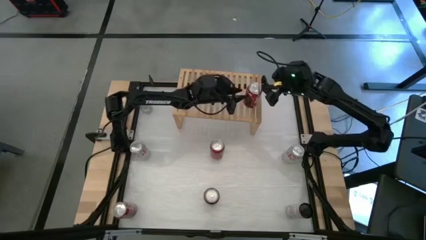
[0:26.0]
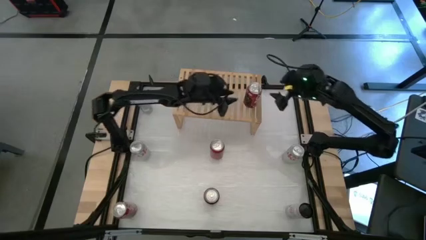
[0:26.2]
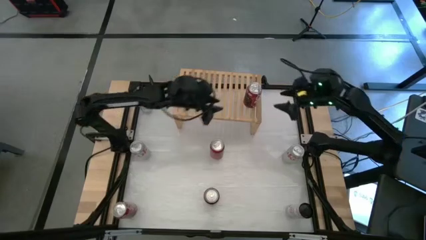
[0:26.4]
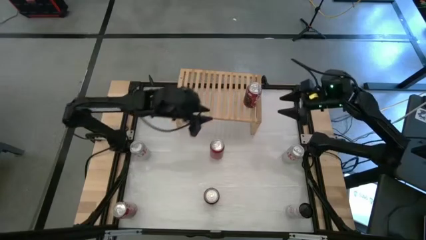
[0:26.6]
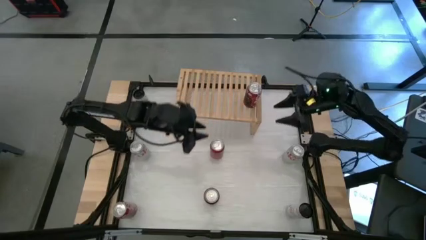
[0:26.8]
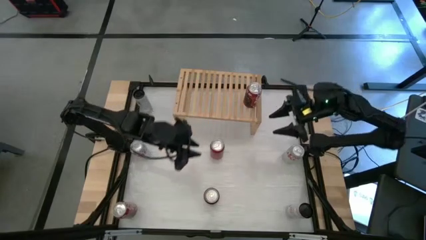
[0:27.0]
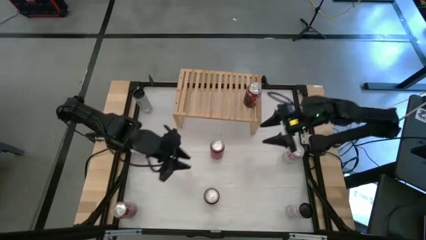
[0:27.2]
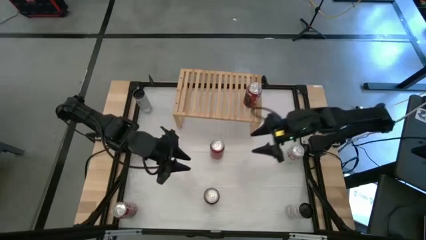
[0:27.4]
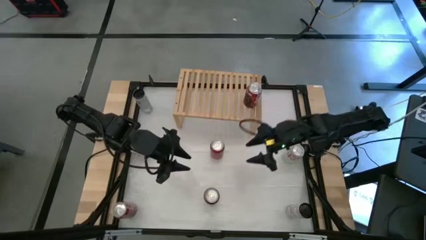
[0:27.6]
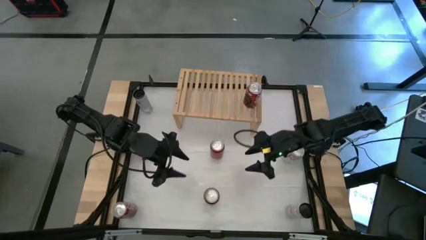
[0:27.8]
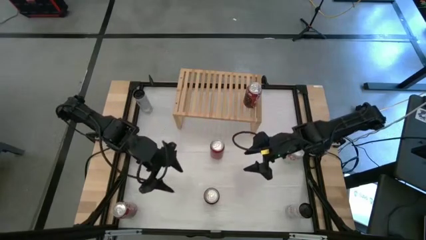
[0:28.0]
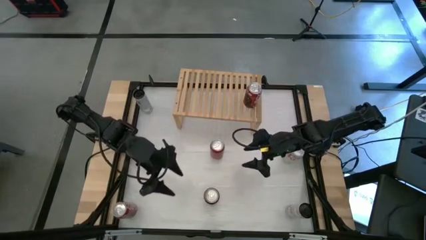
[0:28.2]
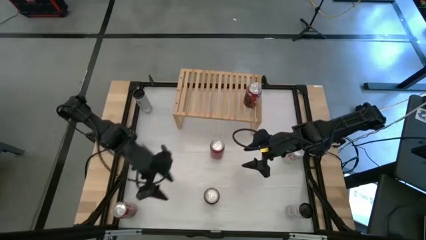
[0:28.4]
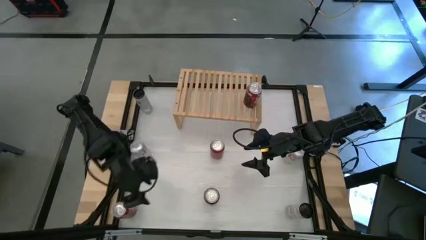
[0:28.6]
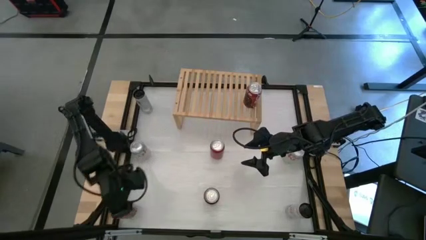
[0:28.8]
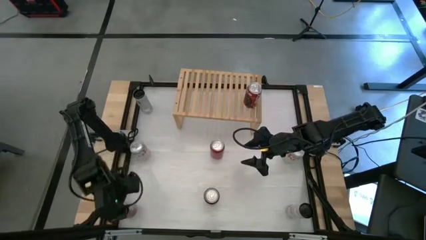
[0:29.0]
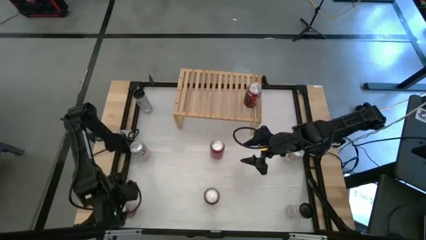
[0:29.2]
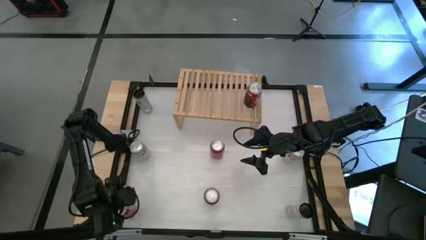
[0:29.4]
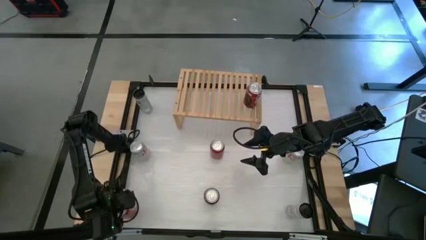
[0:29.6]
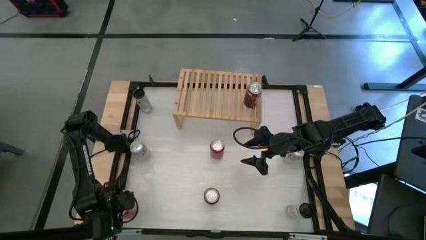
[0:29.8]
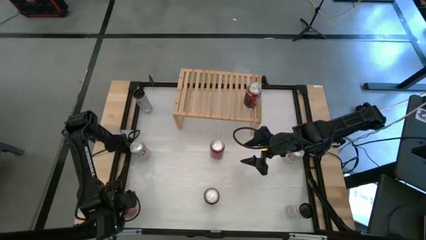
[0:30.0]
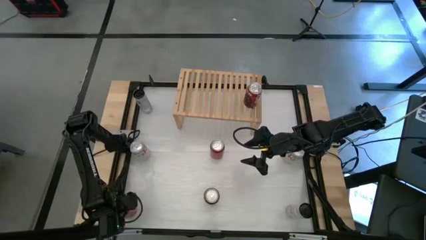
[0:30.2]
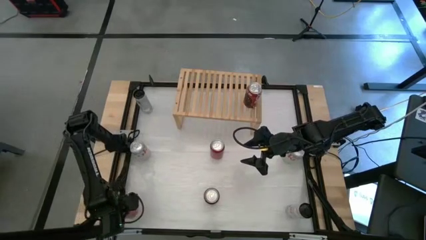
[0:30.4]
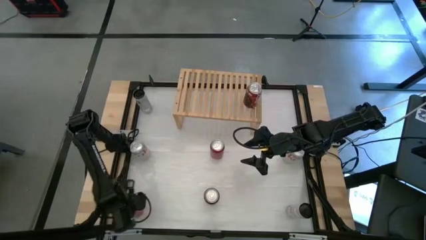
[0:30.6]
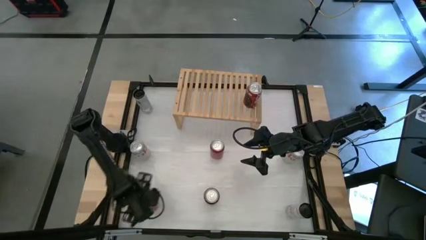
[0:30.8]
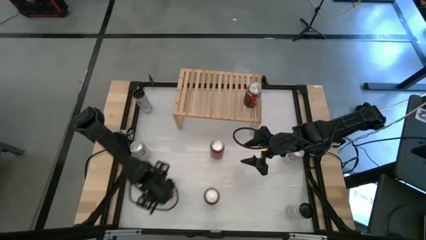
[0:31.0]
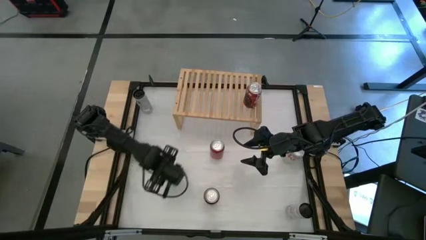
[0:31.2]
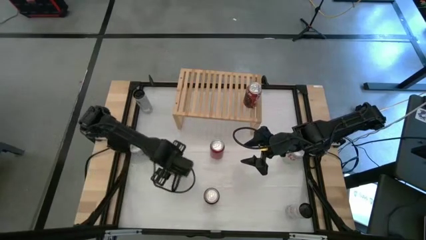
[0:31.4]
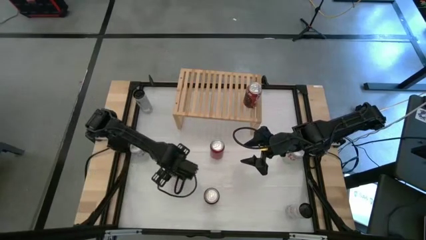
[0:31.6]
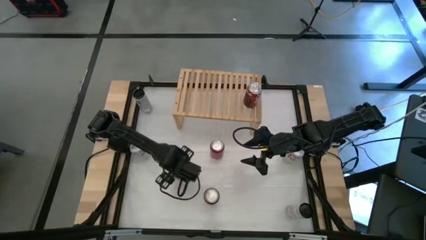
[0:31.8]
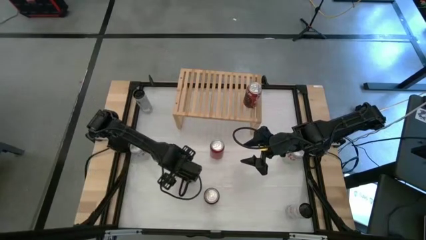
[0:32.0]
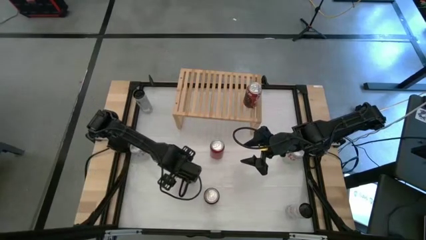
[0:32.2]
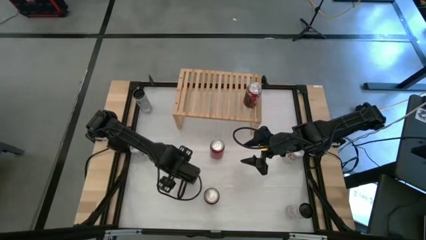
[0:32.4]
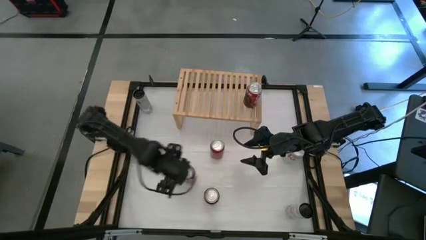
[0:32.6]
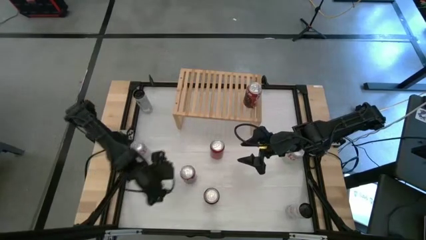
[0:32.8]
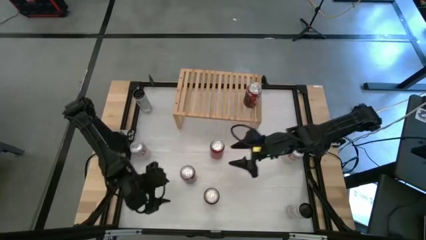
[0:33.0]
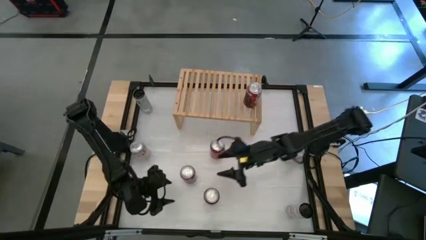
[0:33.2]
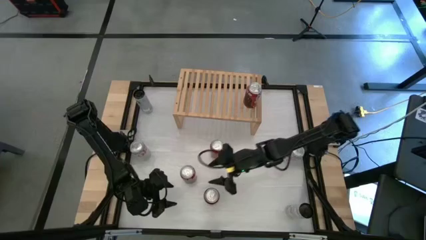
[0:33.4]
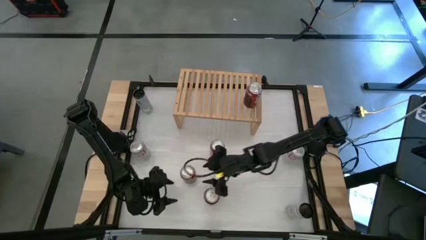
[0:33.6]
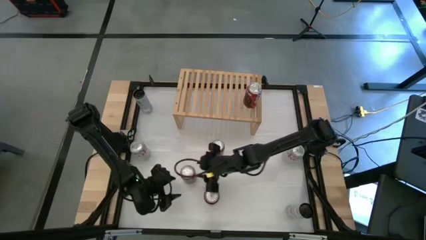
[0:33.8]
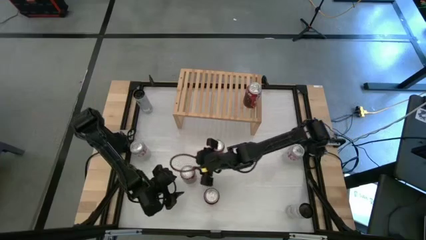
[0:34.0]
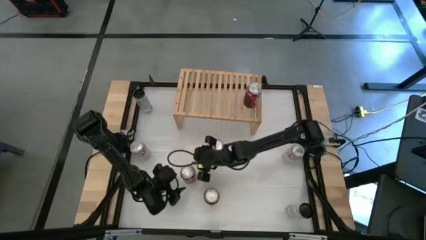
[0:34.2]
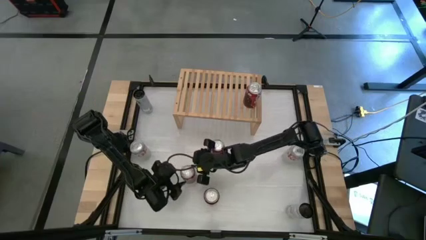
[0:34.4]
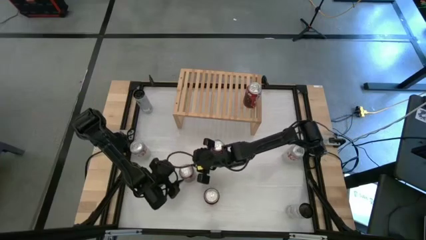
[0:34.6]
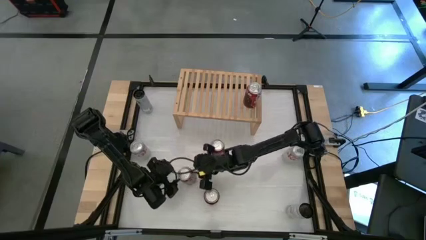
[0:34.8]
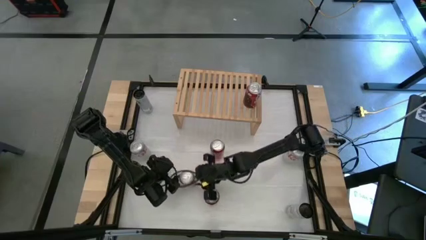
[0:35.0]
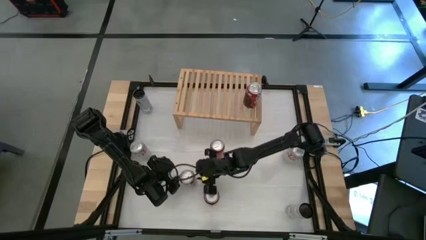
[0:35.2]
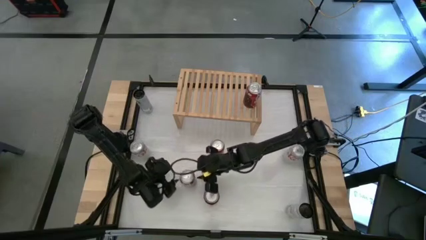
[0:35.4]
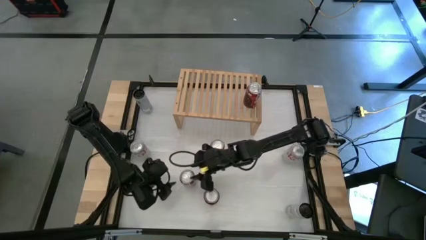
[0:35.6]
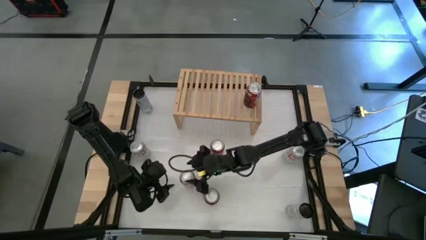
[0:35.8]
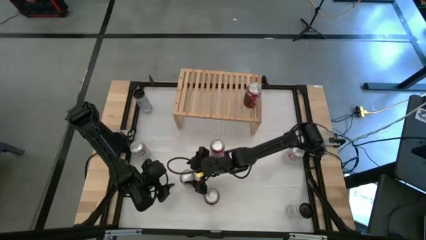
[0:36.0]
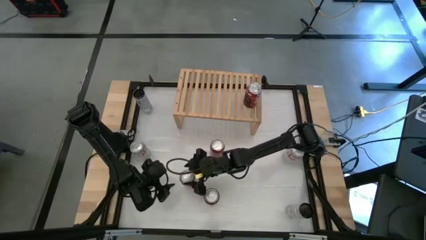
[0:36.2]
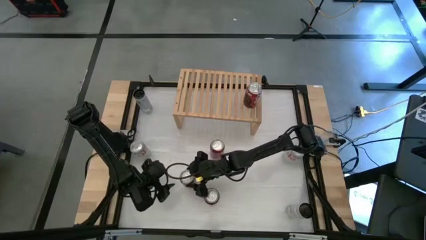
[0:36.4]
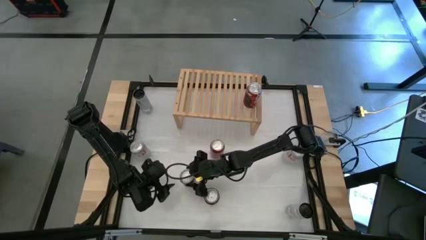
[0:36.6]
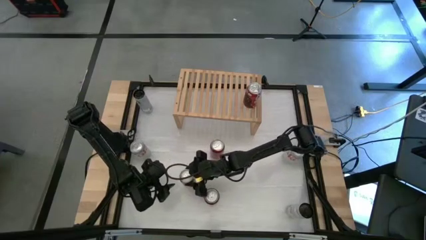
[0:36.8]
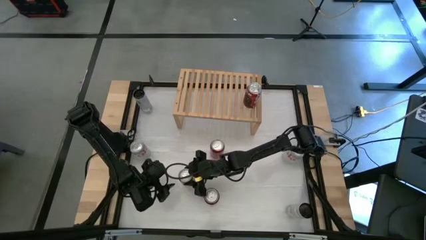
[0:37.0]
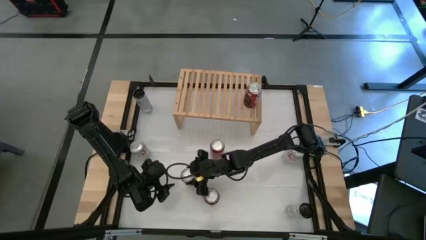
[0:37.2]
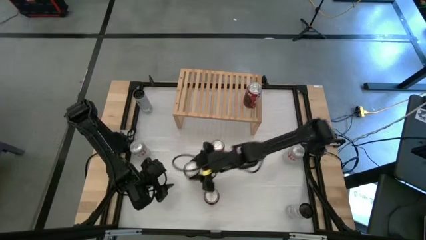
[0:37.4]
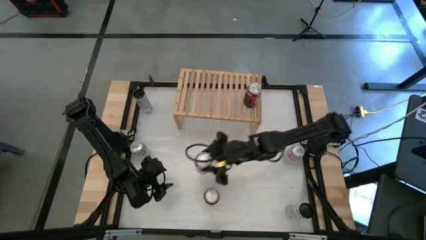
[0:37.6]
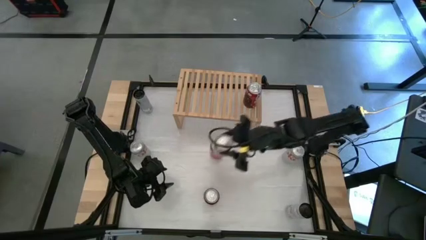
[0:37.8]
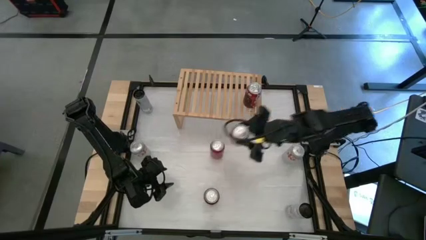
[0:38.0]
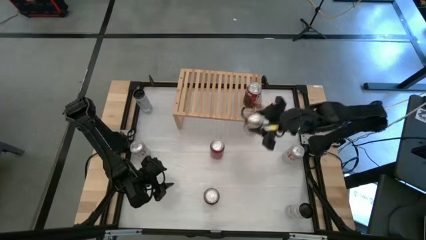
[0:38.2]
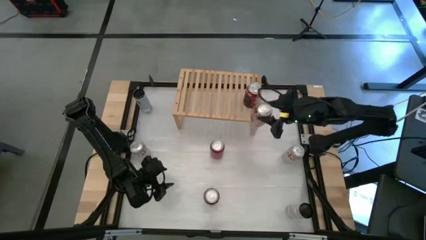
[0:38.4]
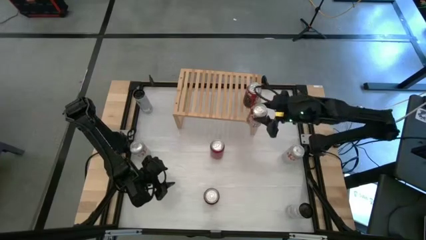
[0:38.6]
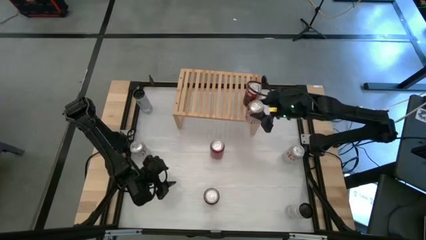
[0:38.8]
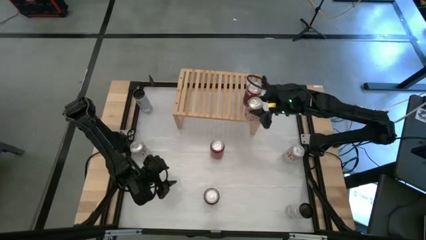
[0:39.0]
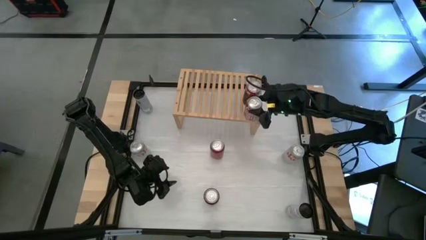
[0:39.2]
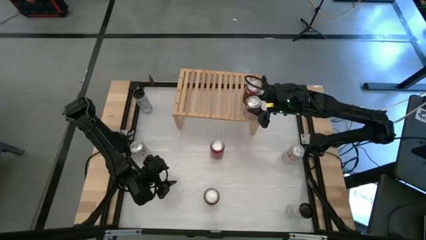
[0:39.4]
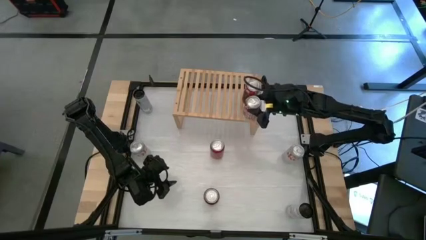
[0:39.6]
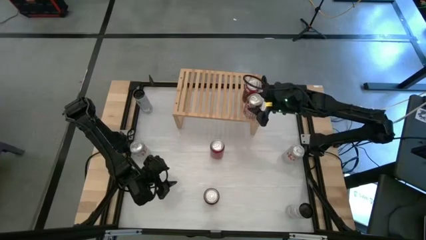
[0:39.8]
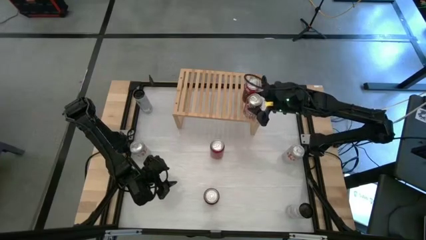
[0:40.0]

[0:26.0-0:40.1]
Task: Place canned beverage on shelf
Put the red and white soda can on the shelf aligned with the other red and white soda can
